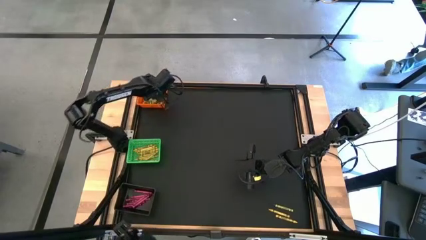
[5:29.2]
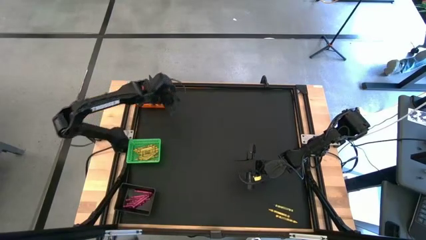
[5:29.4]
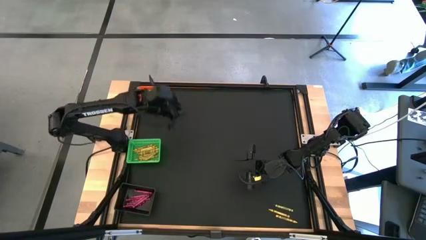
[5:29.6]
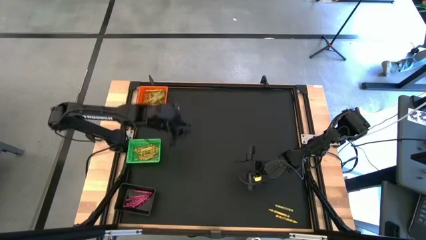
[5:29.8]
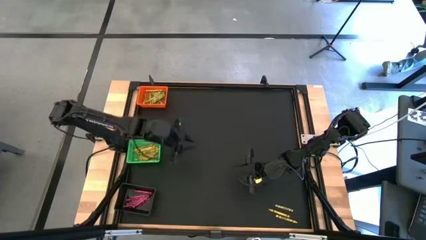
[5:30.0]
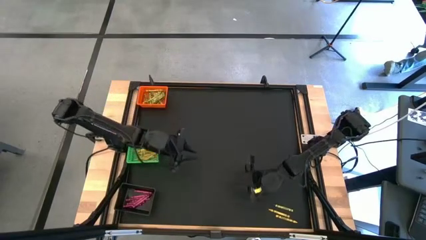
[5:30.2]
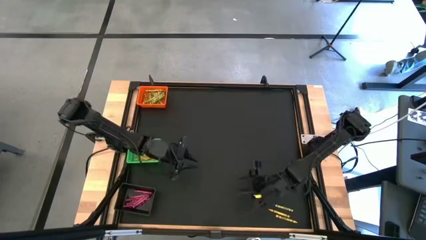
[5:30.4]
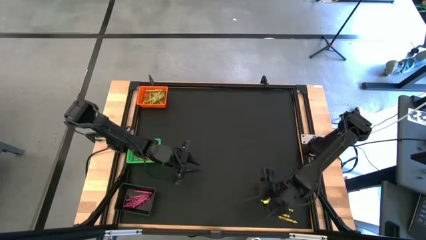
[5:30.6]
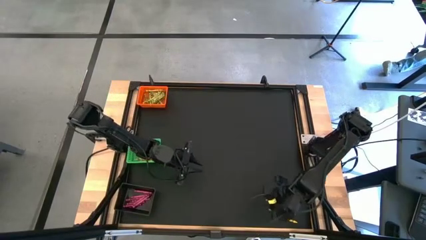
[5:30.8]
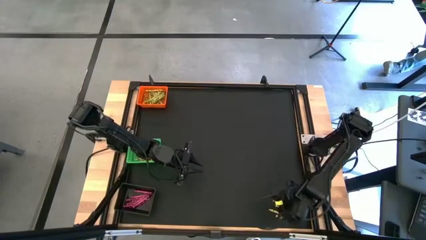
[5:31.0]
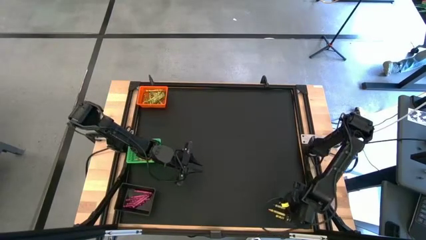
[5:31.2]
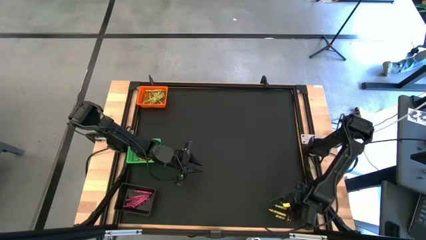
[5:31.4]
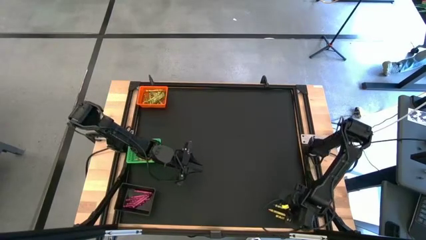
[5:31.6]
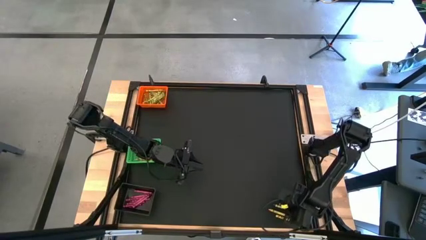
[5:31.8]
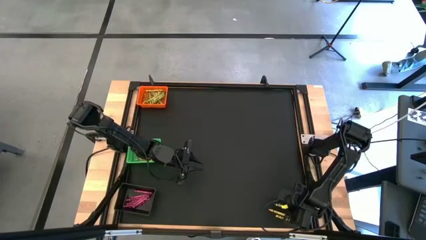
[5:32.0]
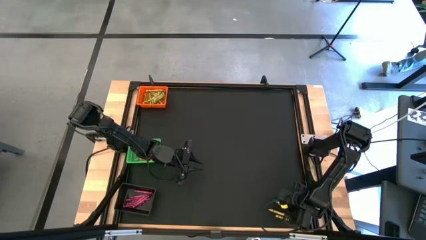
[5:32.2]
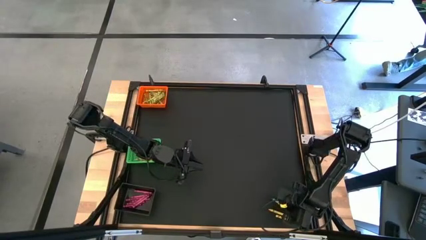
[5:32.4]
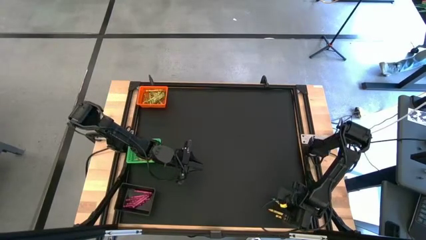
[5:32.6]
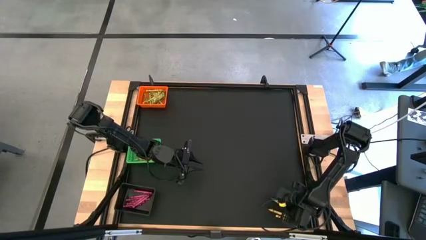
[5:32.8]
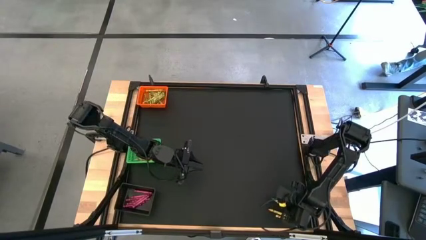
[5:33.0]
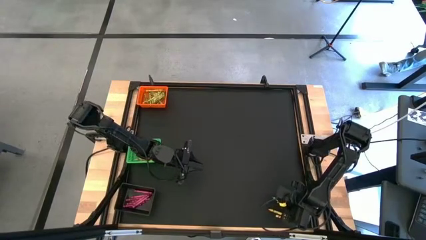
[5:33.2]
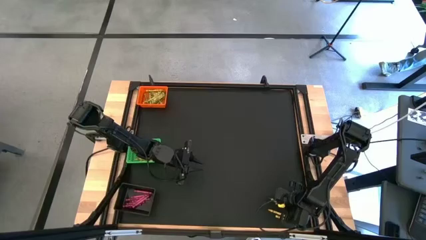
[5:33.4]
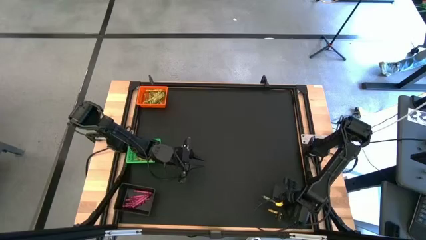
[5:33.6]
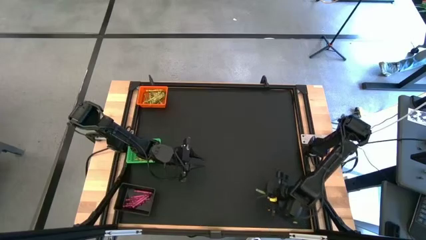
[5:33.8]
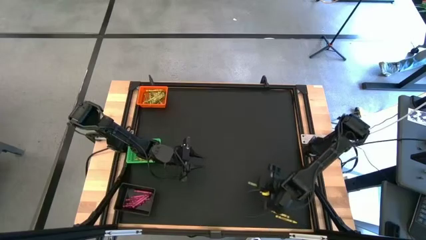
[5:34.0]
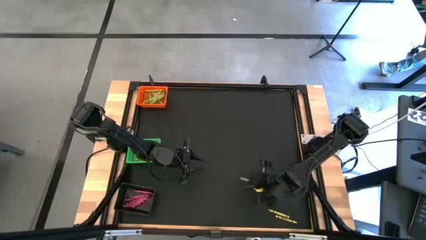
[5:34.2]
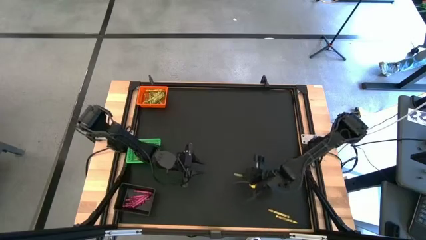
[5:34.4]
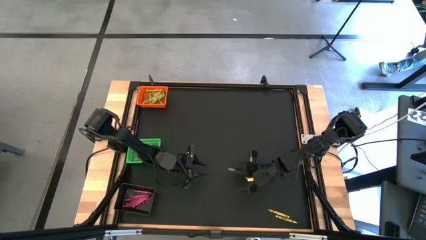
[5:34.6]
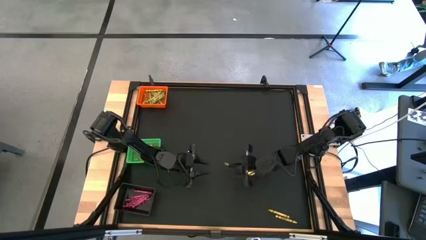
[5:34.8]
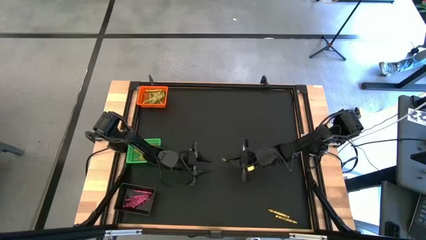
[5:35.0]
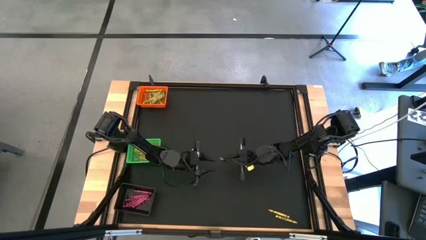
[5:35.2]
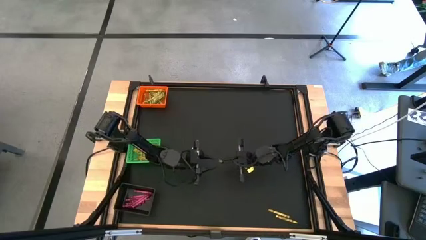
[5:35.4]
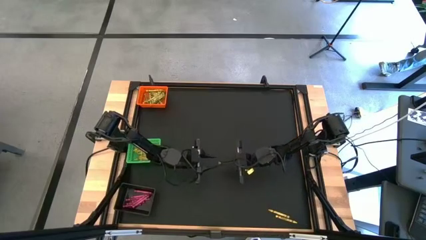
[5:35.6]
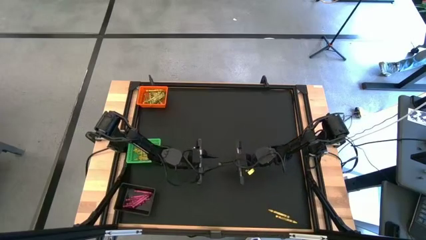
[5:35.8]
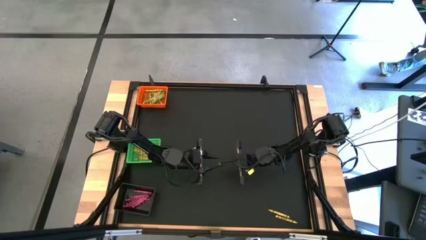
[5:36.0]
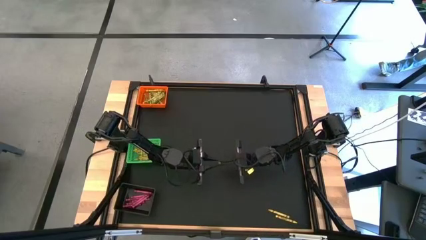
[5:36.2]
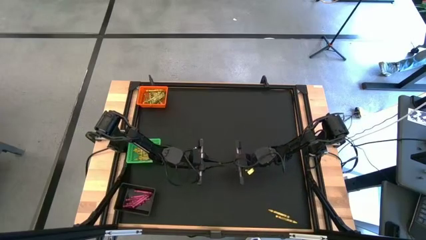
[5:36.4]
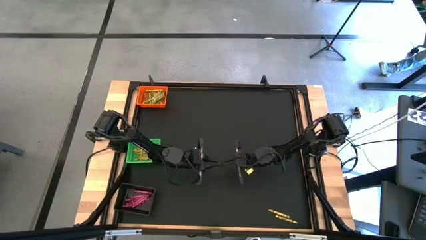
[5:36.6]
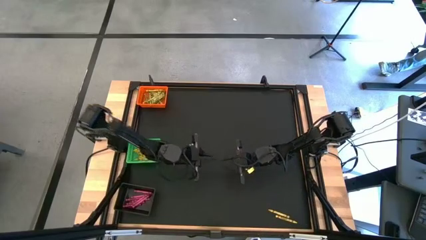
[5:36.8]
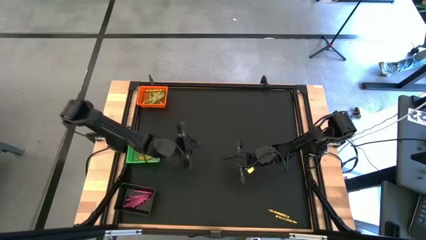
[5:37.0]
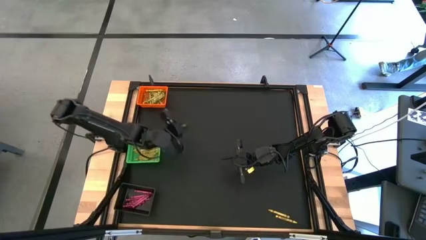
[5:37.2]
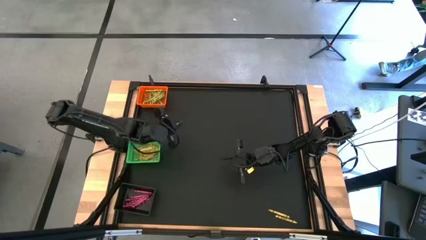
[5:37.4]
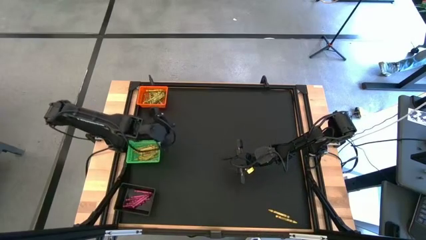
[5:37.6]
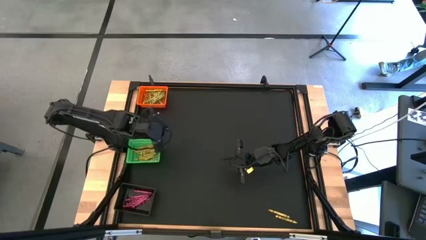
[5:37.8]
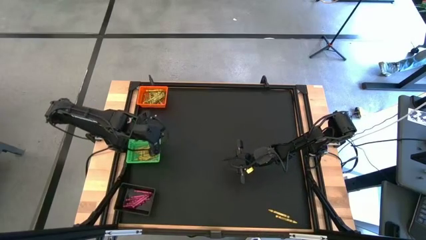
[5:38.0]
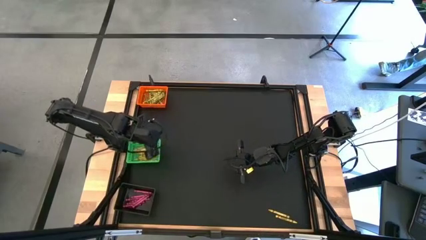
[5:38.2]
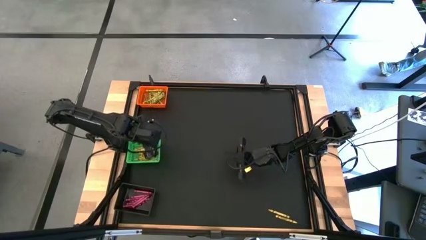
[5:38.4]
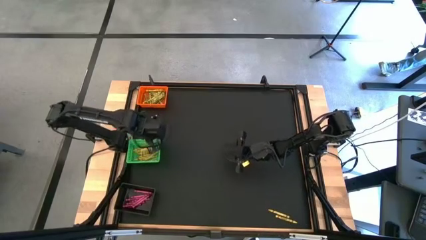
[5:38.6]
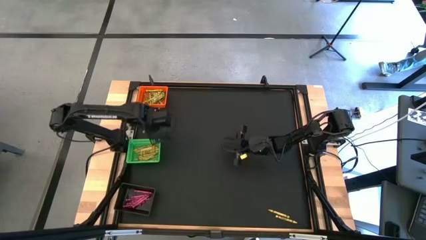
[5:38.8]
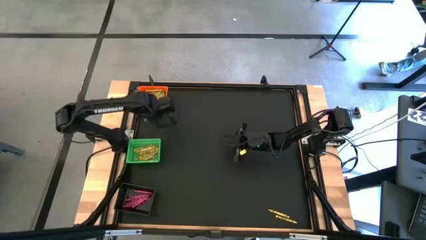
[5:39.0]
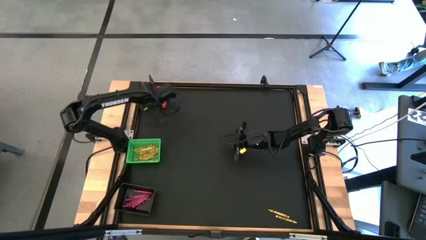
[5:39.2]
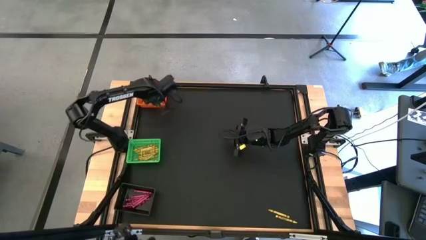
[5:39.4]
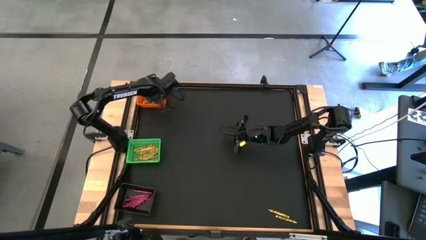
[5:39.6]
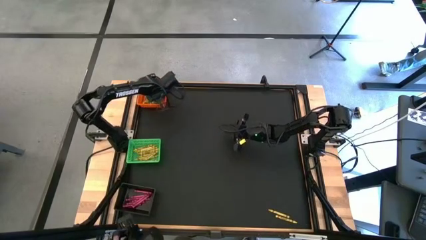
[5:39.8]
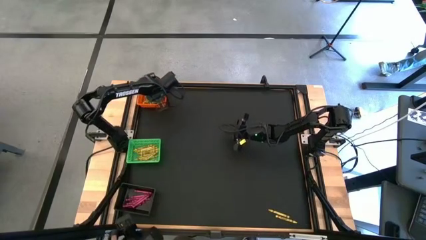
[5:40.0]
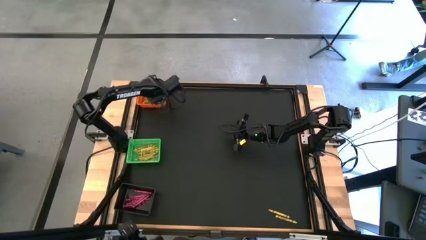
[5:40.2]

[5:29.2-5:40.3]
Task: Sort crayons
Put the green crayon into the orange bin

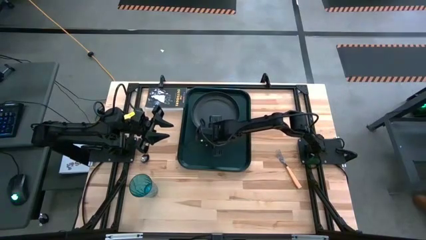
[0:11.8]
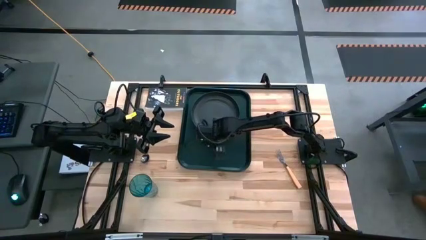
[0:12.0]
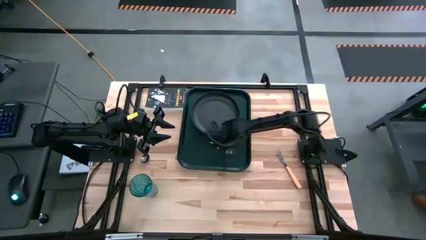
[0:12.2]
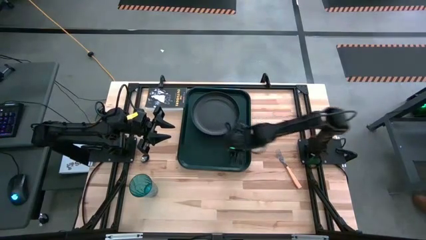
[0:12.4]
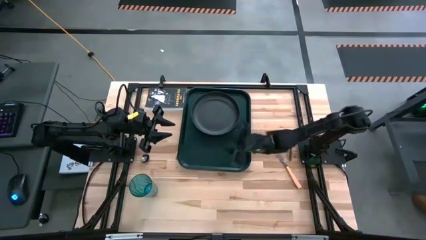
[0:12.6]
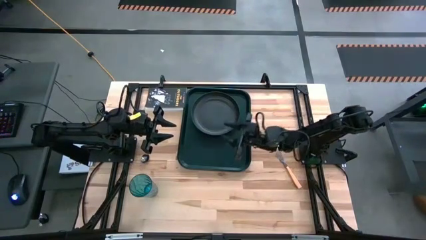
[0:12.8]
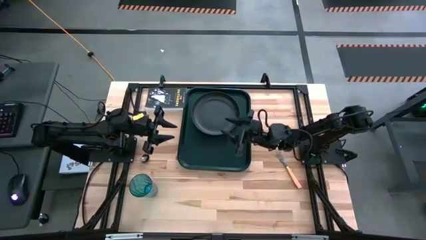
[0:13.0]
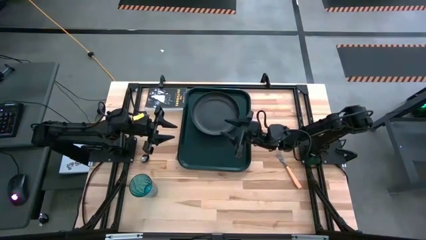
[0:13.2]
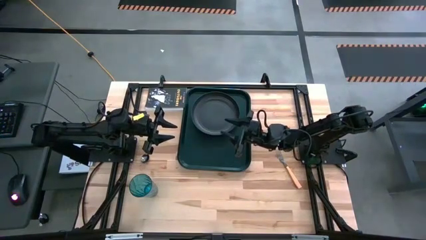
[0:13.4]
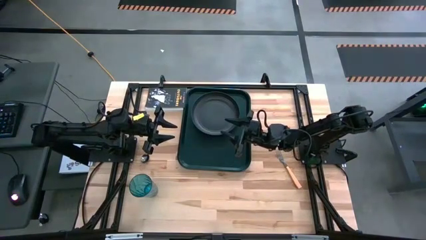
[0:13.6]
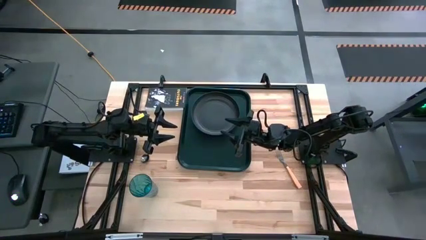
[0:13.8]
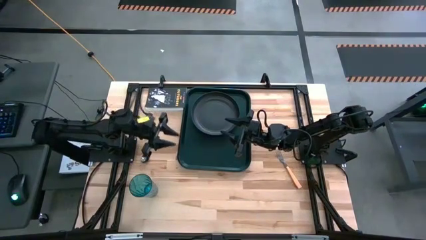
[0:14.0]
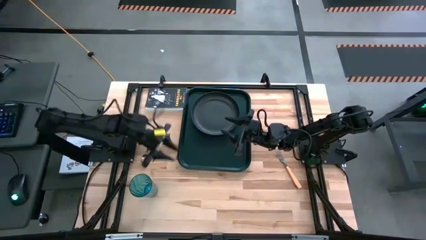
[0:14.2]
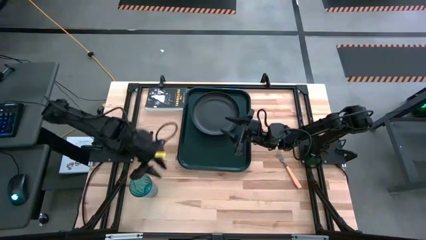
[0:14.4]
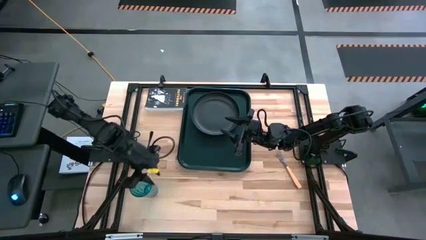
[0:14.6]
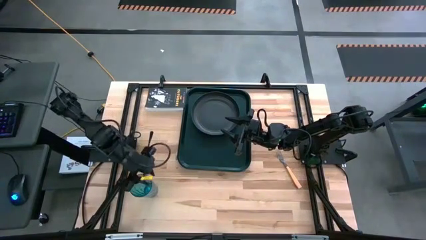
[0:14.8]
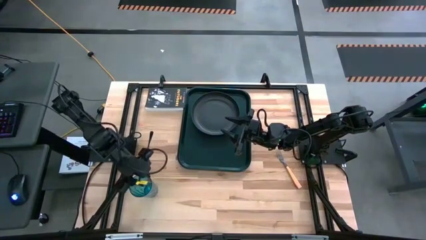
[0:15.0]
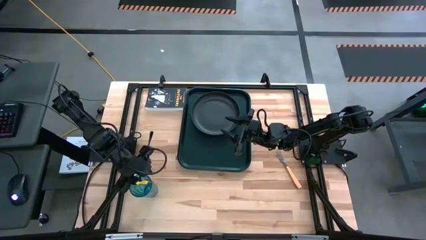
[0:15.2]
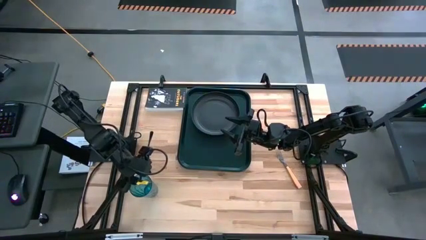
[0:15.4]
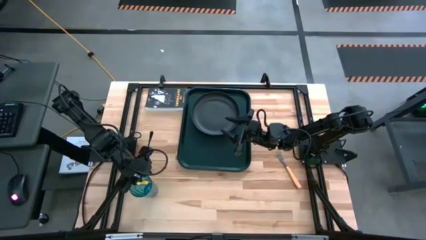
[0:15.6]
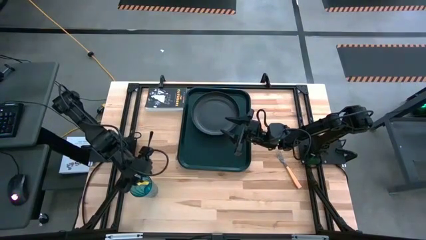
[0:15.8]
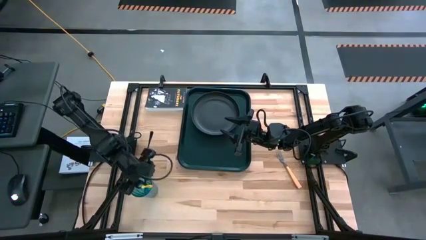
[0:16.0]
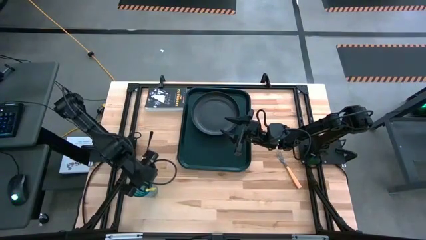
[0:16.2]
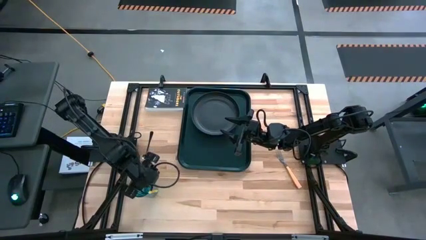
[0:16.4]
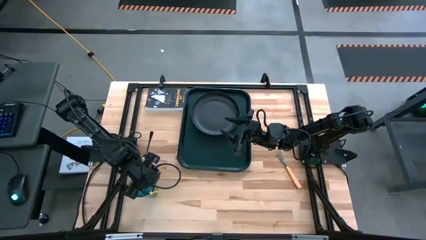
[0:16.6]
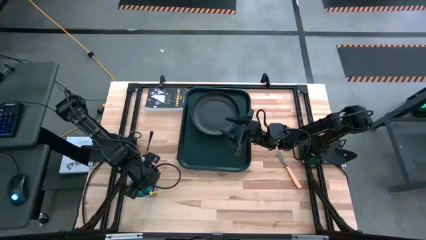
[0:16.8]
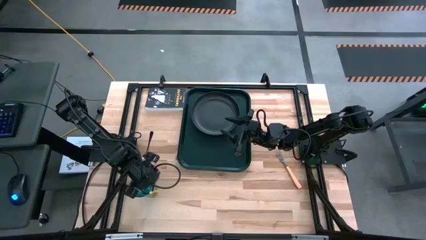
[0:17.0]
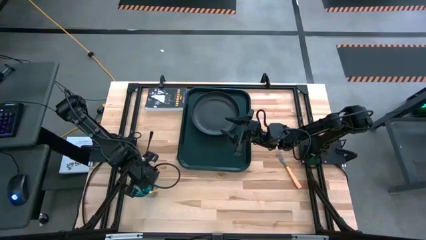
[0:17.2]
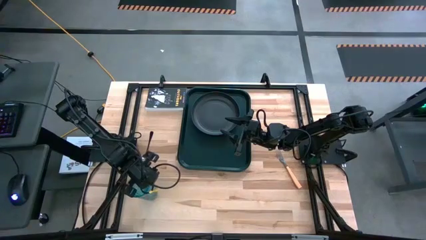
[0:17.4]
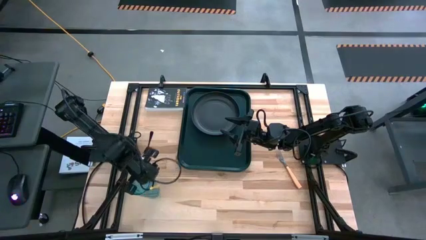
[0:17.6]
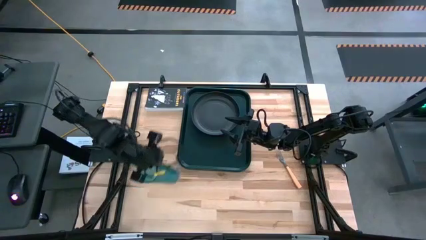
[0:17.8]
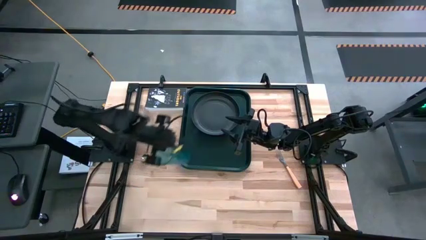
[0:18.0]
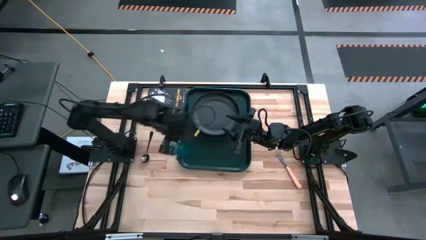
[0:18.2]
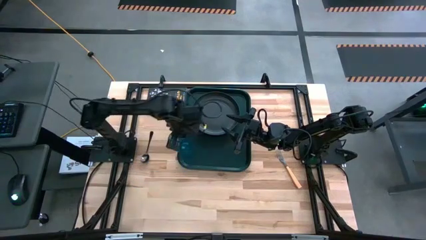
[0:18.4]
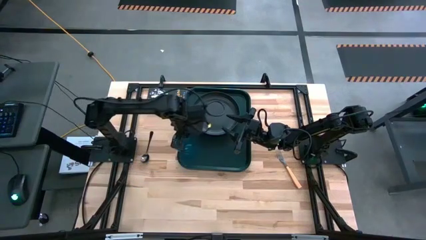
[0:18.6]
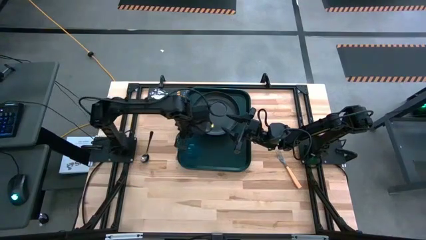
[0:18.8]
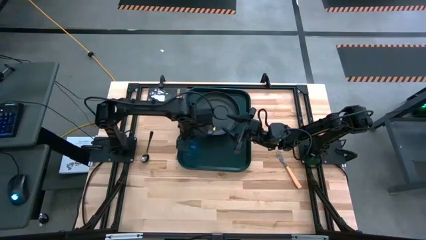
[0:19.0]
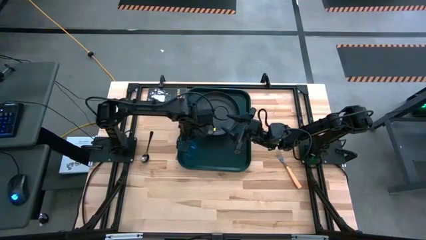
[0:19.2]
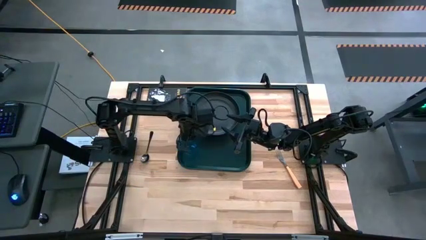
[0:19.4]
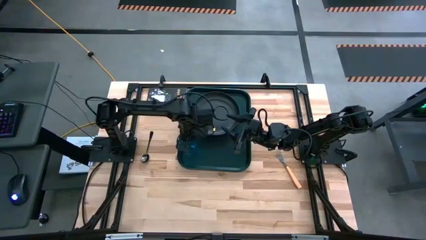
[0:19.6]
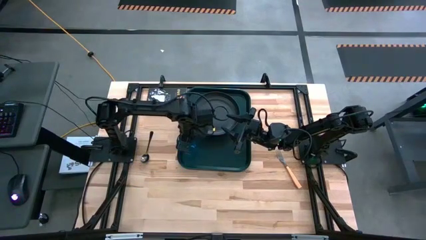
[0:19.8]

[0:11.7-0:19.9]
Task: Pick and place plate/cup/fork/spoon on tray
Put the blue cup on the top left of the black serving tray
